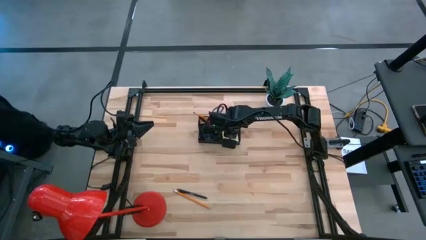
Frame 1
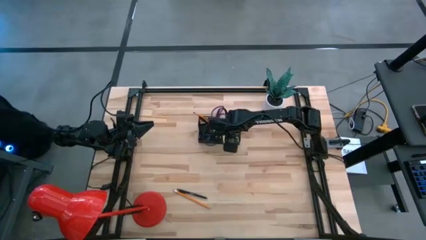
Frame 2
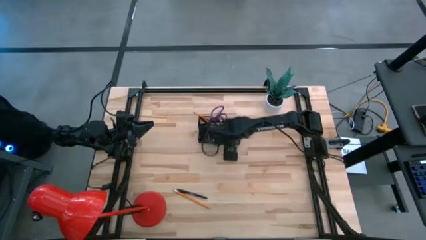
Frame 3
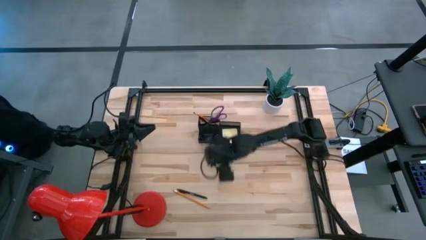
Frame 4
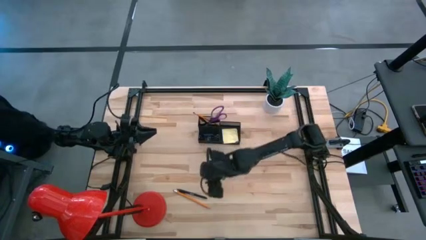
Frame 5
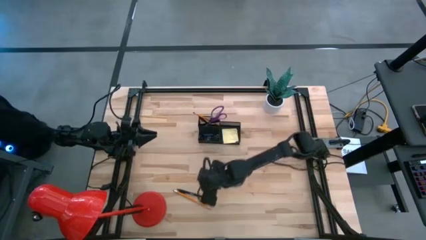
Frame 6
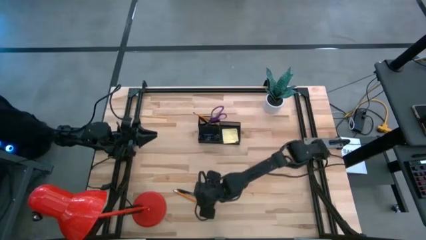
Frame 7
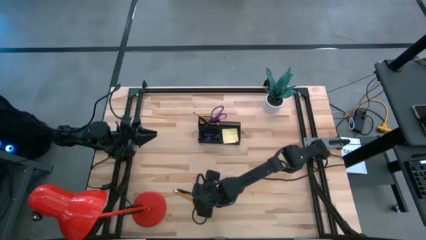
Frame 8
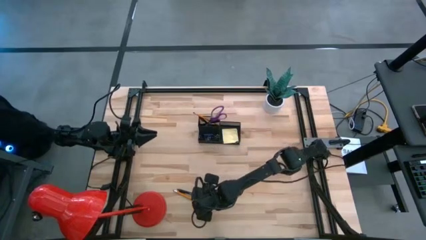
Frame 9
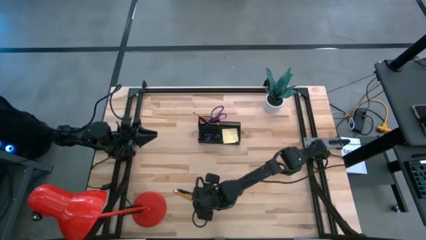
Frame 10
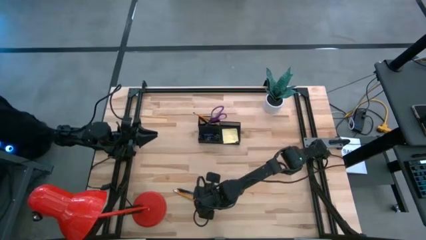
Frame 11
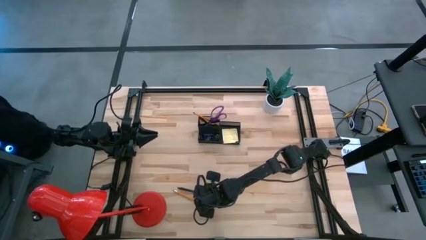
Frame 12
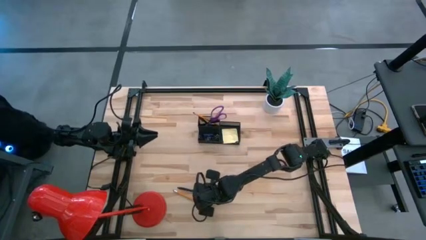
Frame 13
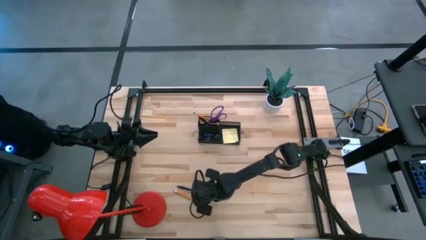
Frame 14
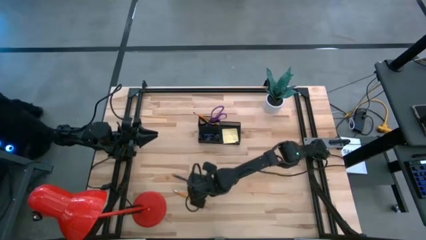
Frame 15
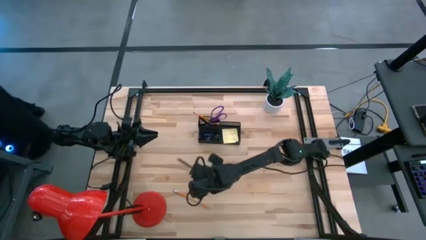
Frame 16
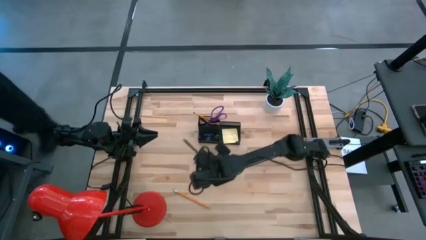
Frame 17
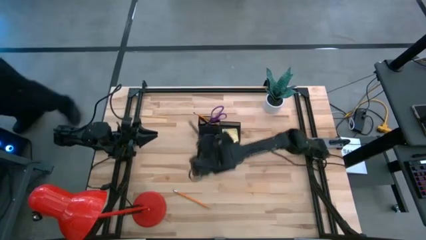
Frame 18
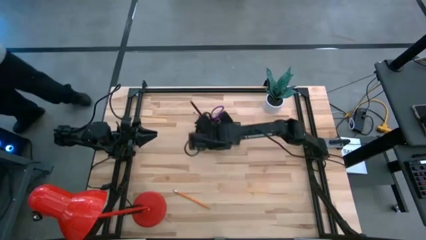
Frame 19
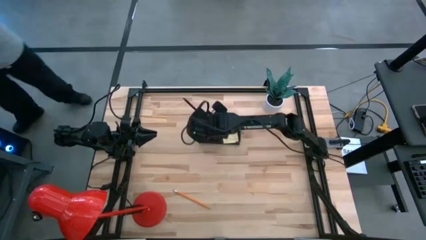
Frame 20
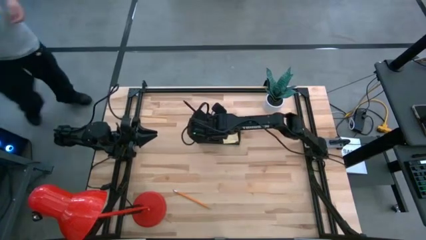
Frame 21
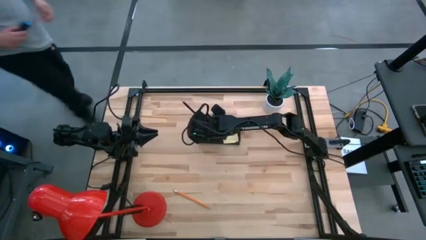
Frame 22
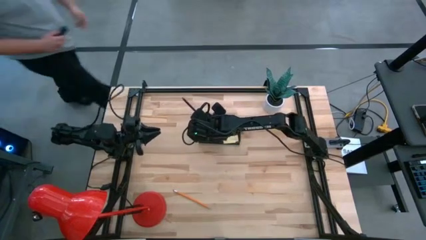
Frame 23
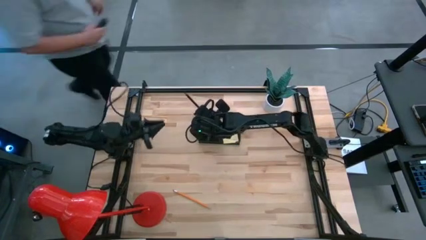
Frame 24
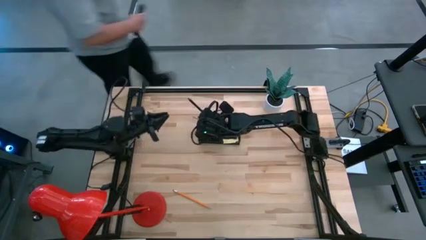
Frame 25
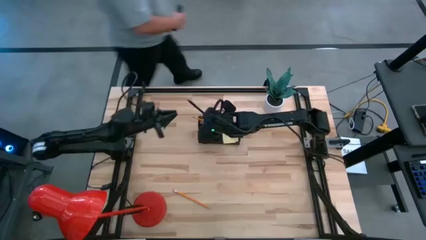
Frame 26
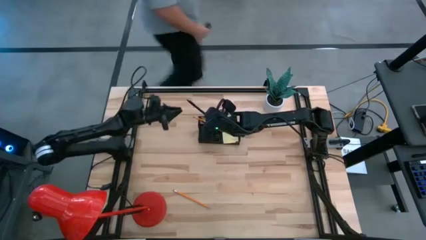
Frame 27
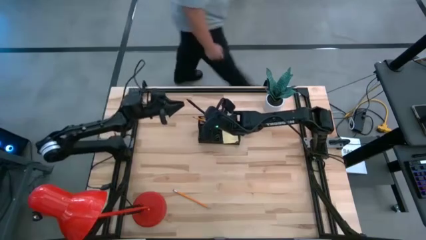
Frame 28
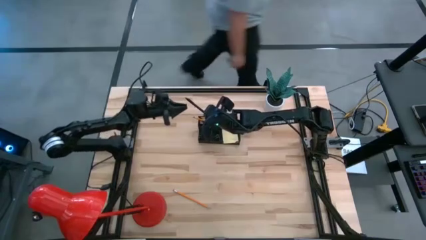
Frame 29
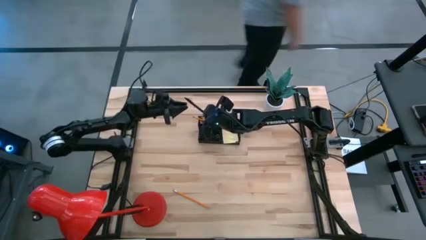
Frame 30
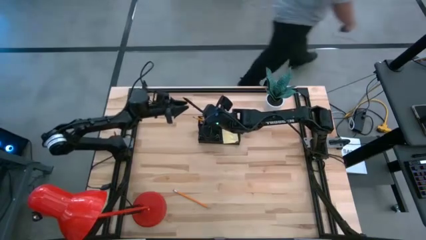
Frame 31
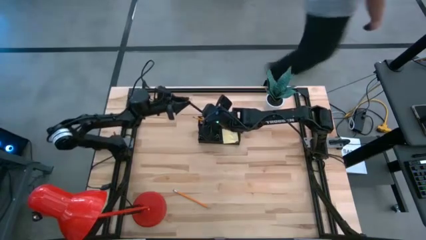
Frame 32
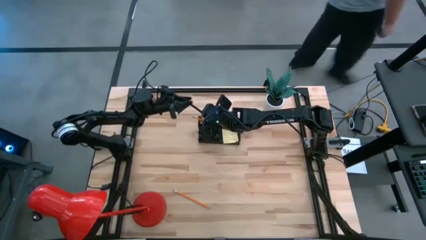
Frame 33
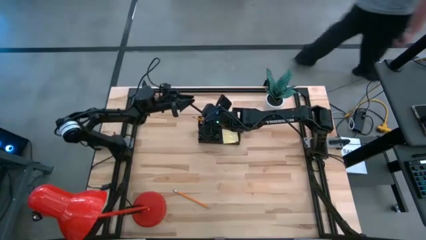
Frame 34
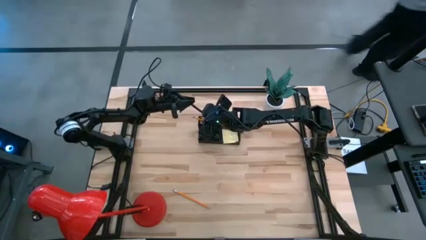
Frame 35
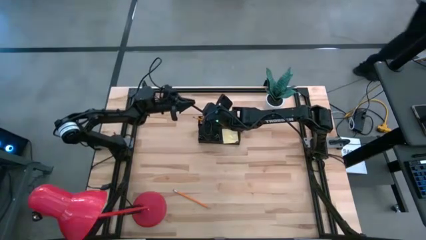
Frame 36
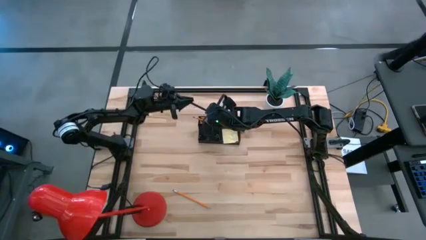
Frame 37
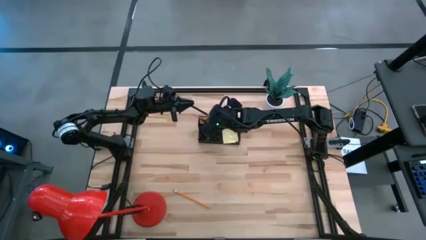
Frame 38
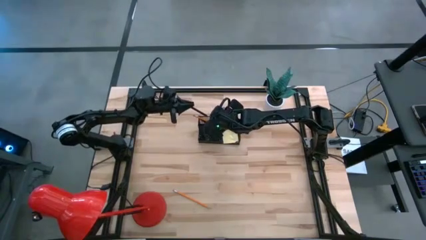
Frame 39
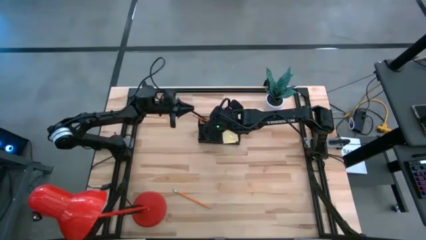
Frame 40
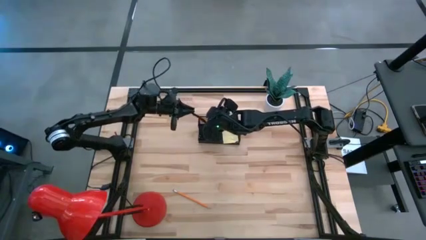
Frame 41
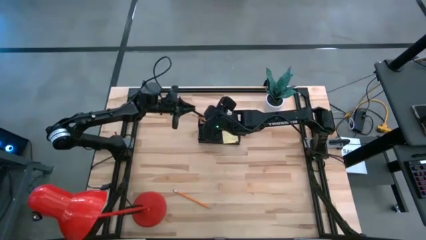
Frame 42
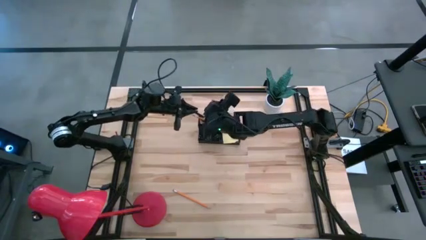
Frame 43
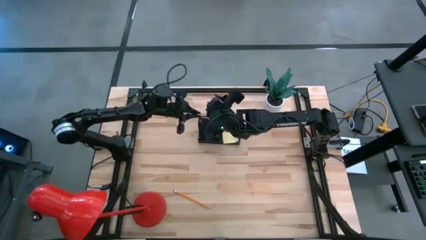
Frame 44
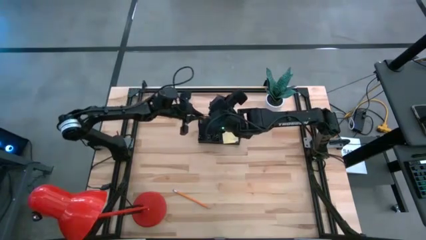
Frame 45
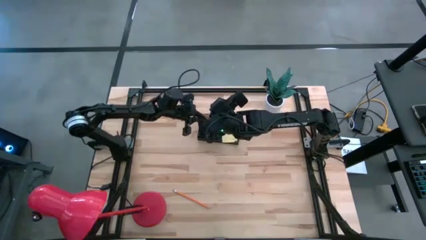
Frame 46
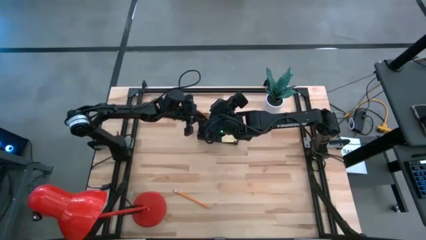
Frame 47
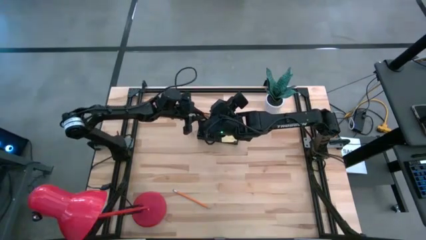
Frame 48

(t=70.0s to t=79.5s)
Task: Pick and place office supplies into organizer
Put the black pen into the desk organizer

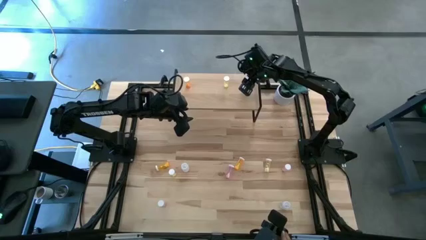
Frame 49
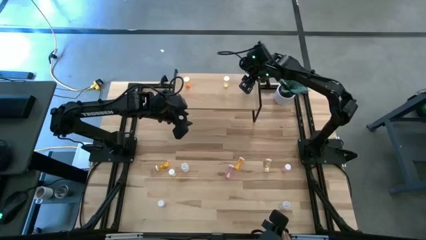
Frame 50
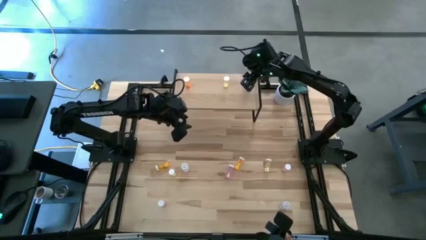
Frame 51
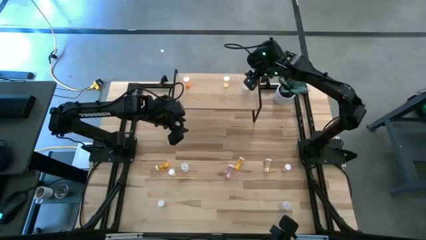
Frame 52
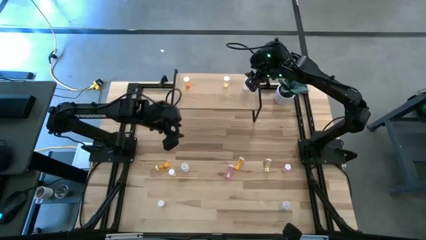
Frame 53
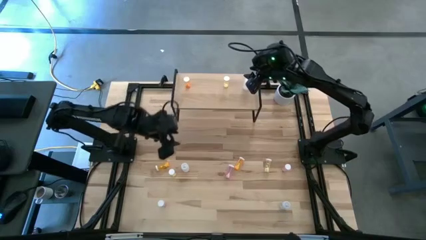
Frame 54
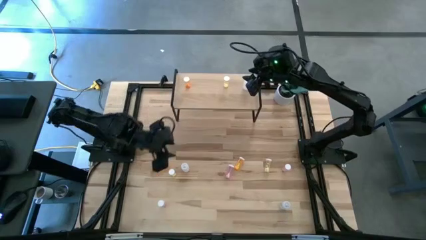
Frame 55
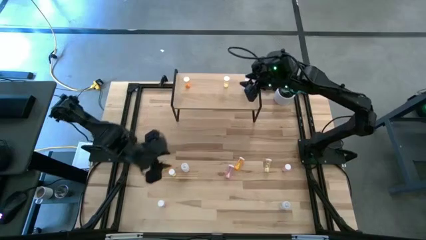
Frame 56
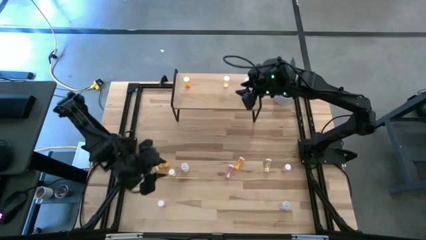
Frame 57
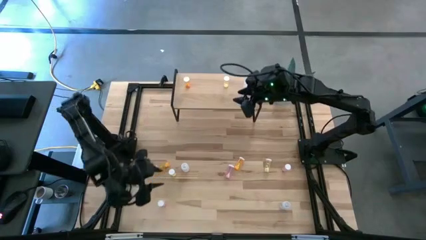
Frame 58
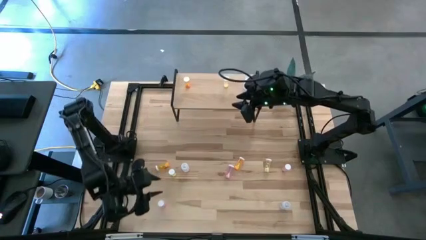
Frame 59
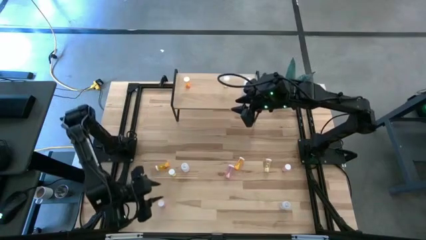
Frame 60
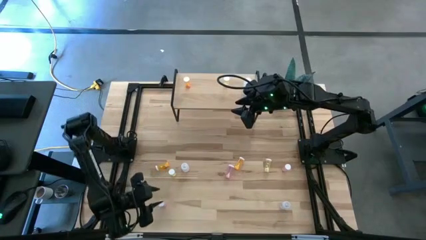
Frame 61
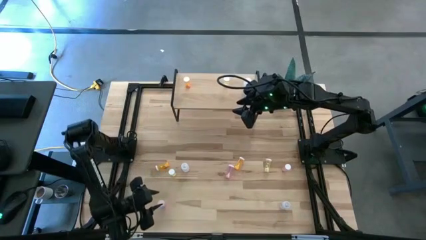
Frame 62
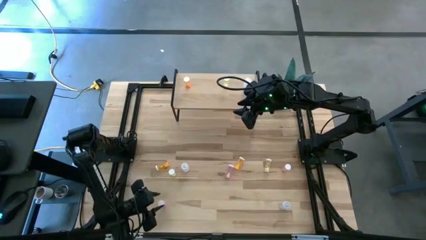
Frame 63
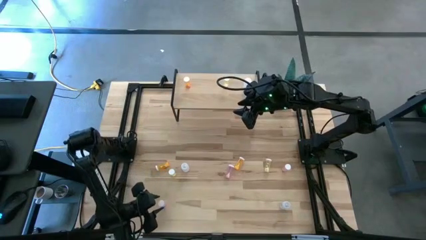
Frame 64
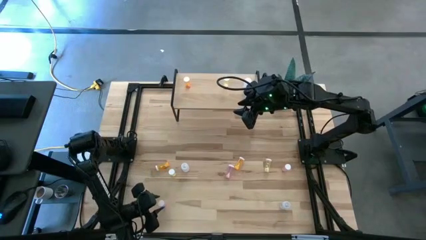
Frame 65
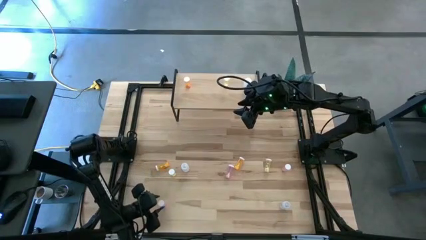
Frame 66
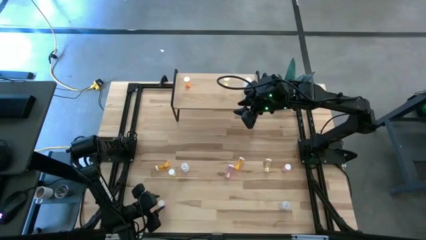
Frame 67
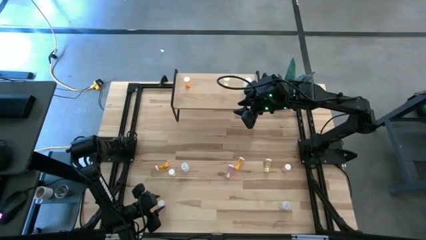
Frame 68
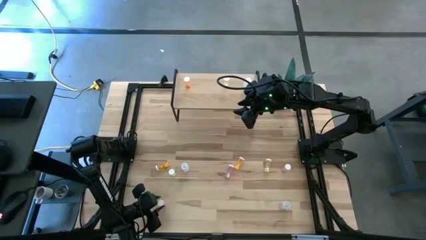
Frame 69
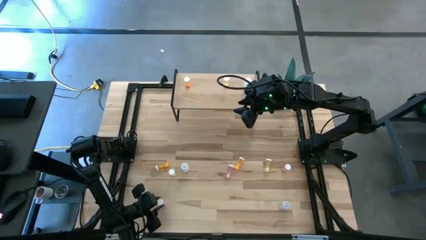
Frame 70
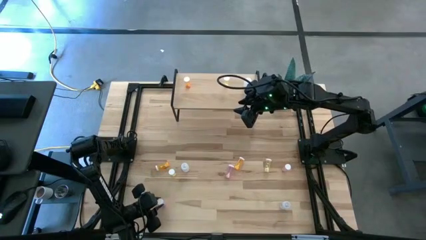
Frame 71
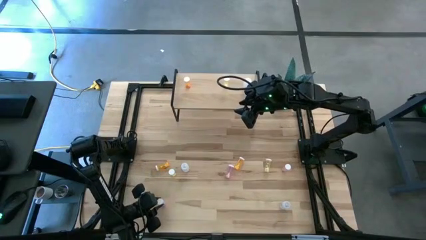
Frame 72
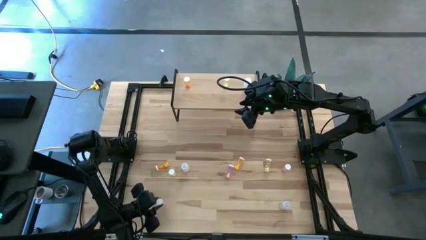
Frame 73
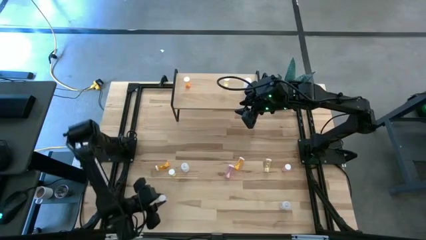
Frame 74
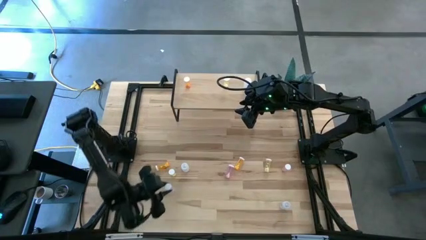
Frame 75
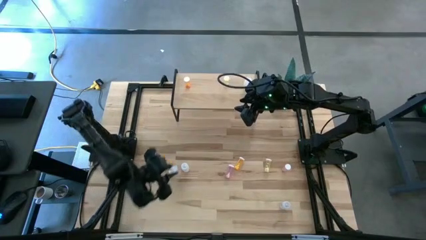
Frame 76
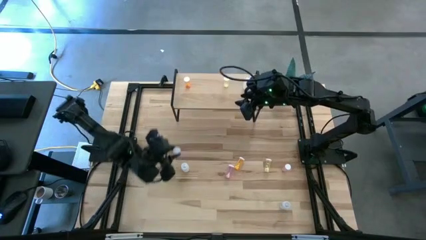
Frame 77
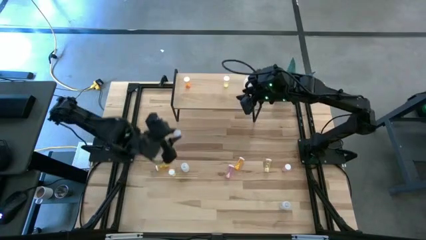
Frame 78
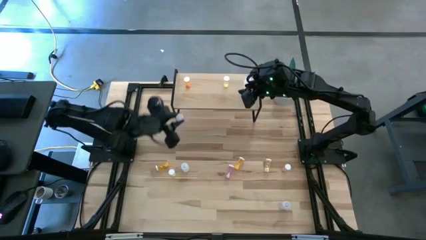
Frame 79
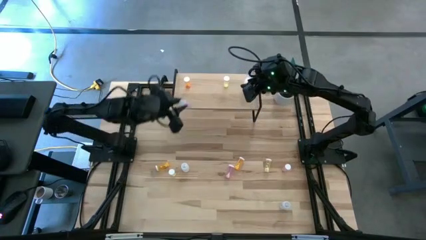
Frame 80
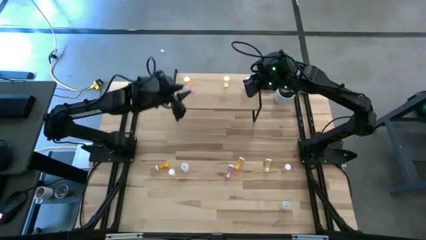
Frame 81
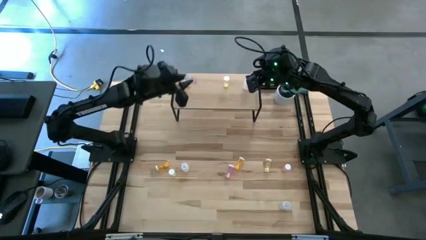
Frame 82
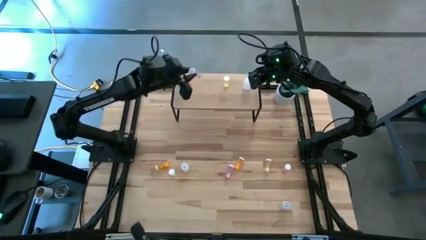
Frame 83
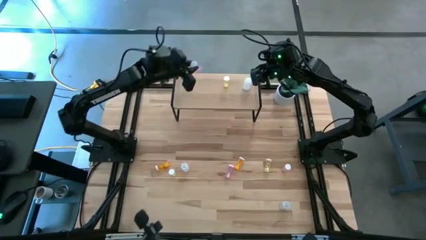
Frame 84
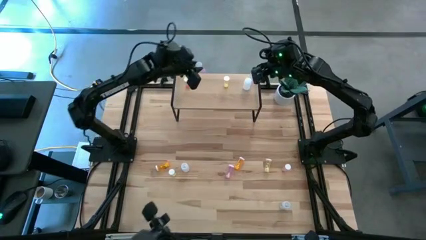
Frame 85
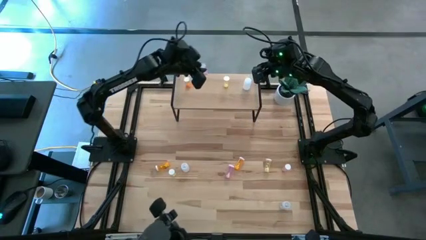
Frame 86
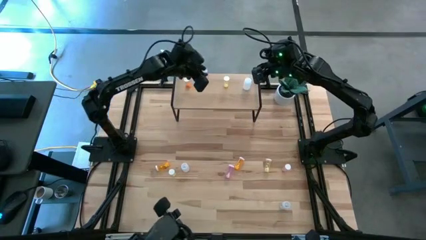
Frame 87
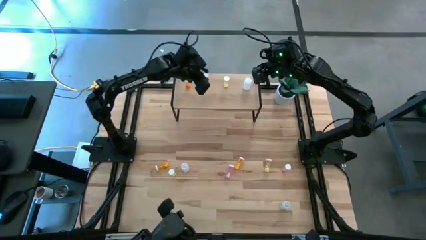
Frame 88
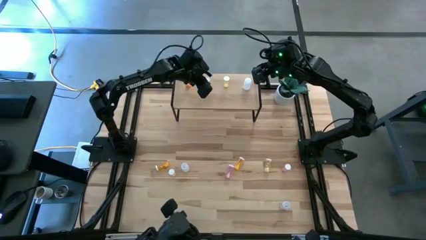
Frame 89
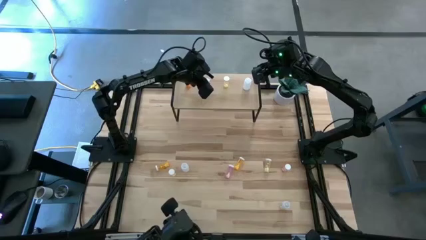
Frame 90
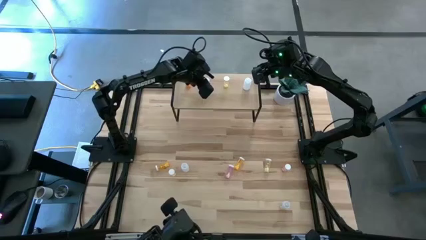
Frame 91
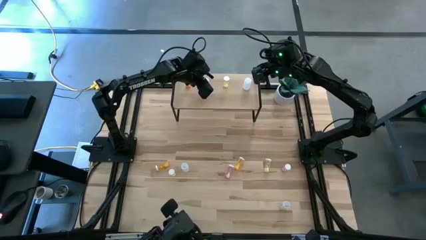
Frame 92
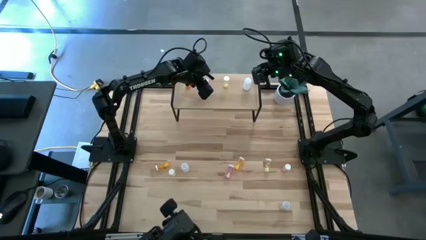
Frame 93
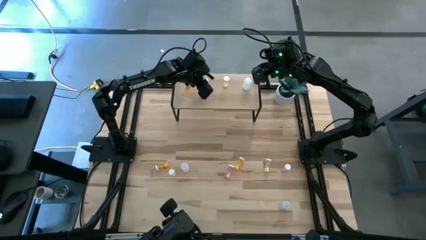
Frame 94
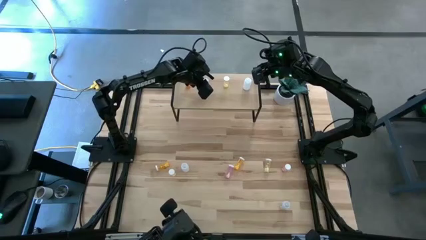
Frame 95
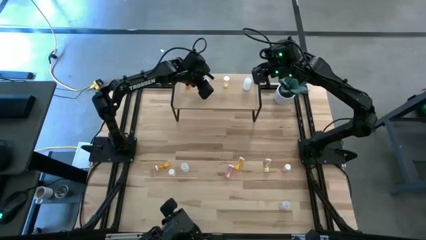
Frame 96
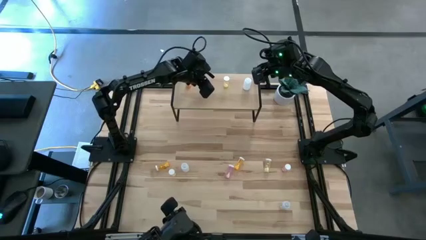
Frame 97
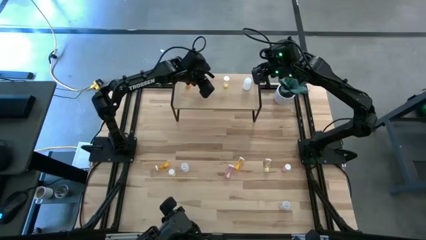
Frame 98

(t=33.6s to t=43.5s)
Task: Pick and place medicine bottles onto shelf by color
Put the left pink pill bottle on the shelf
